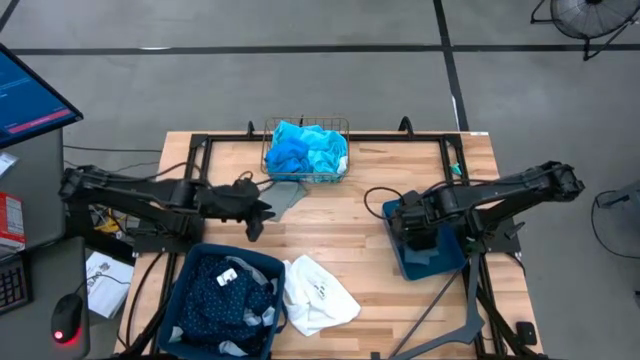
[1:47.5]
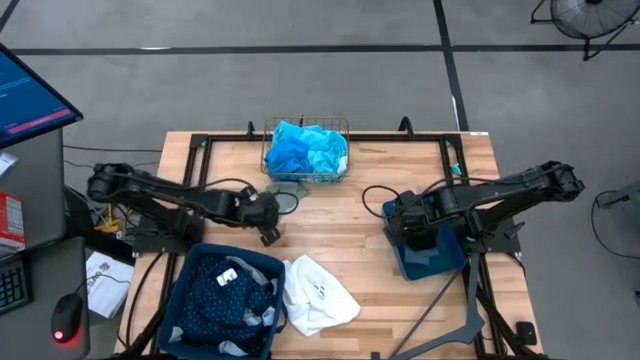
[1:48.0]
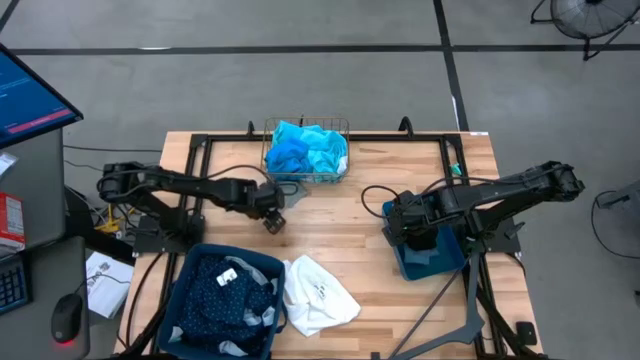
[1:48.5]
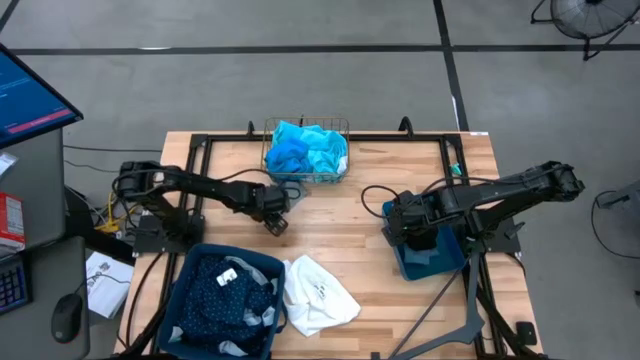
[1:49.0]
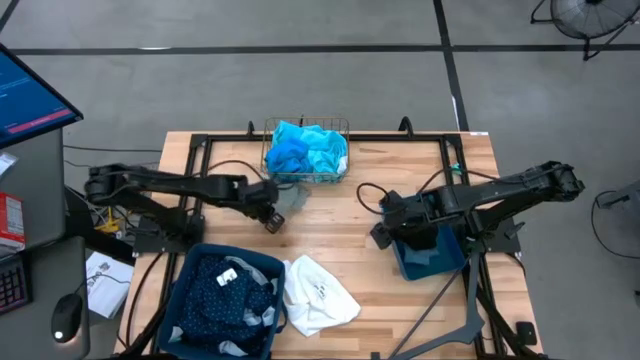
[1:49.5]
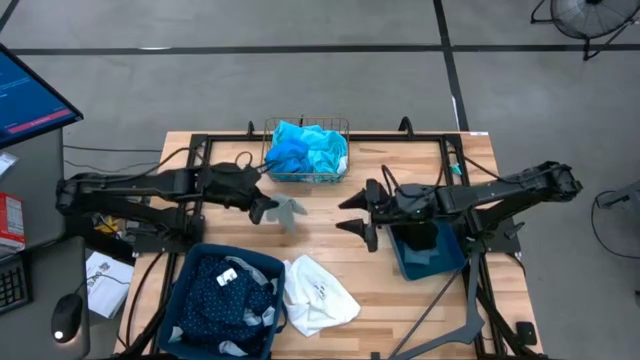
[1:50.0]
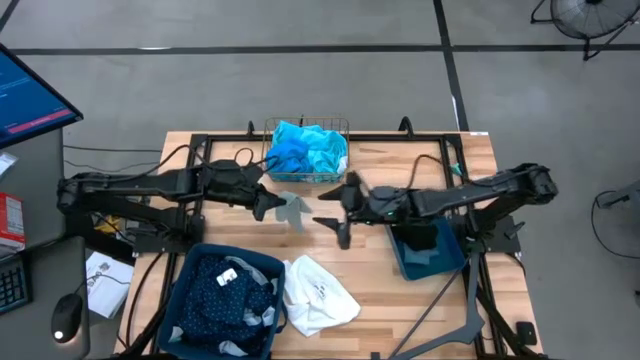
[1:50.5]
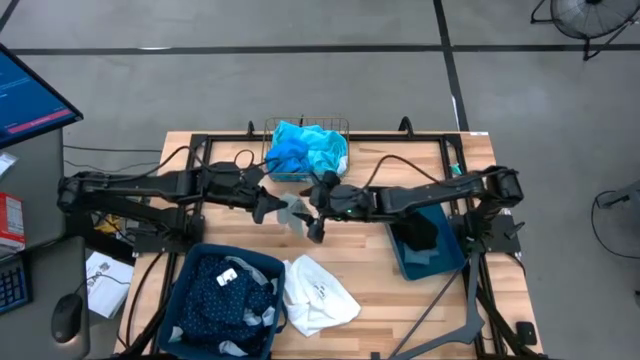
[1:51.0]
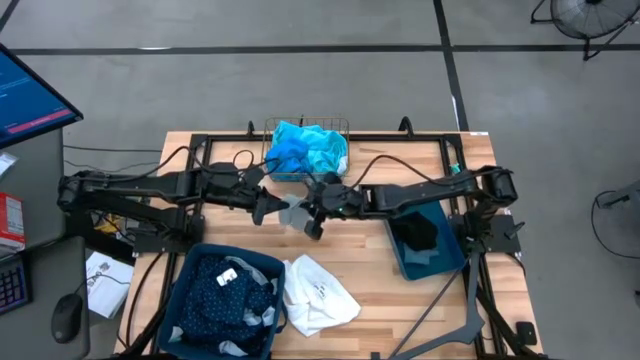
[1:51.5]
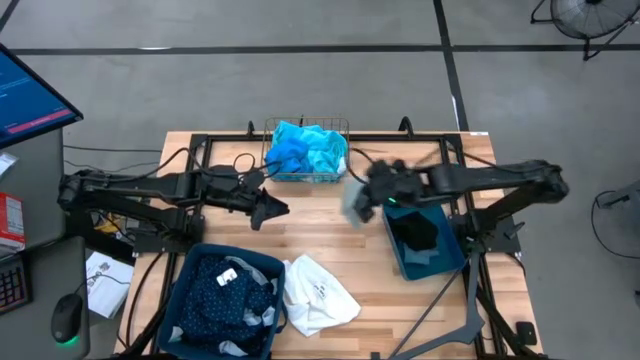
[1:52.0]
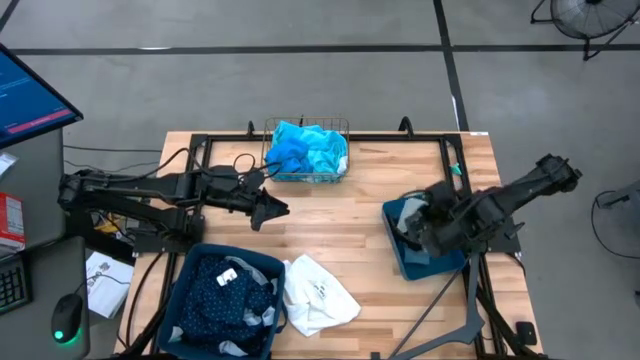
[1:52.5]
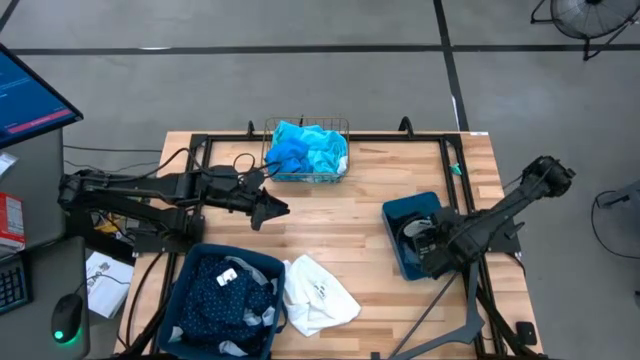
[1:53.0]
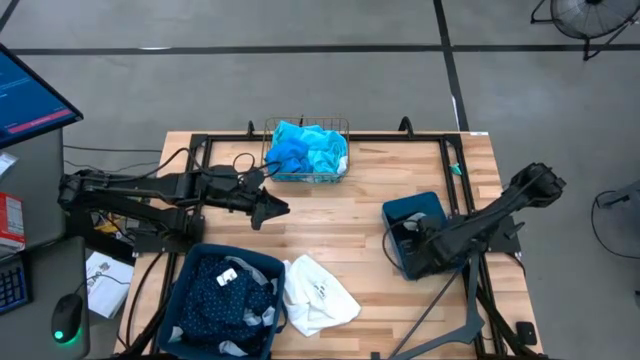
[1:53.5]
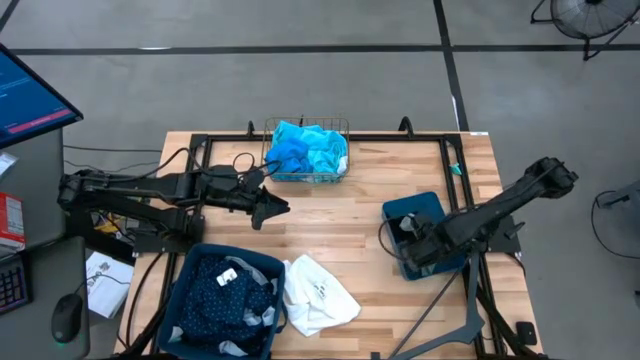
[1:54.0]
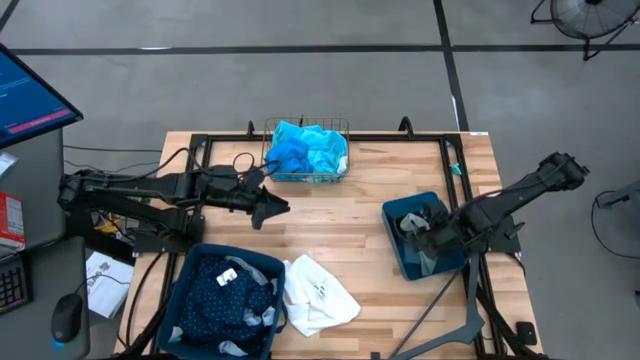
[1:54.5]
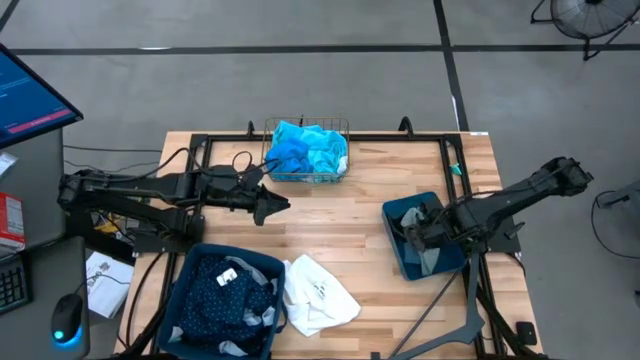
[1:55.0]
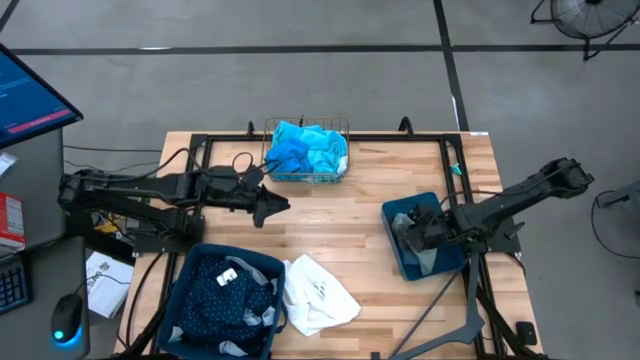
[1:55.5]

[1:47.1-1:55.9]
Task: Pick & Place Cloths
Put the light gray sock into the blue bin

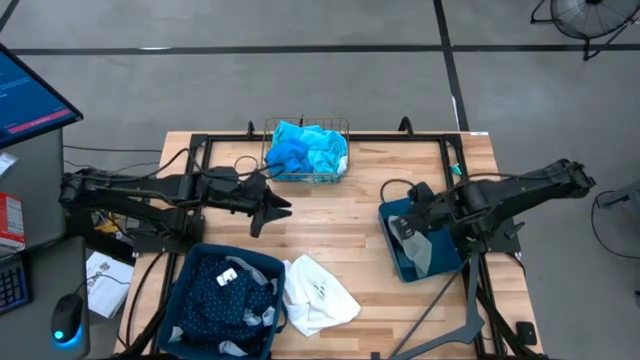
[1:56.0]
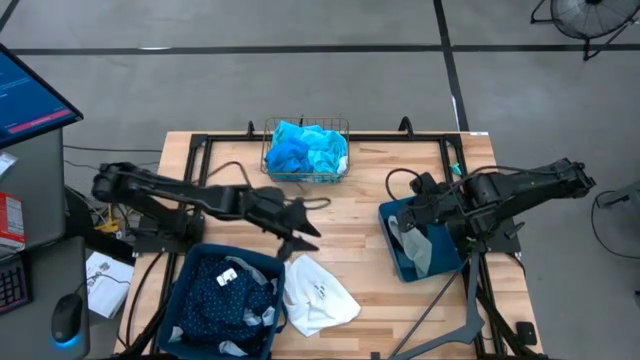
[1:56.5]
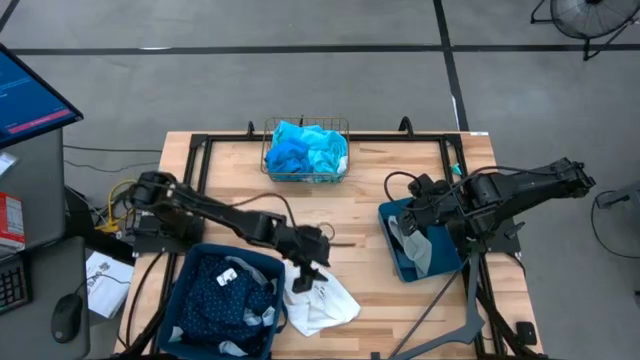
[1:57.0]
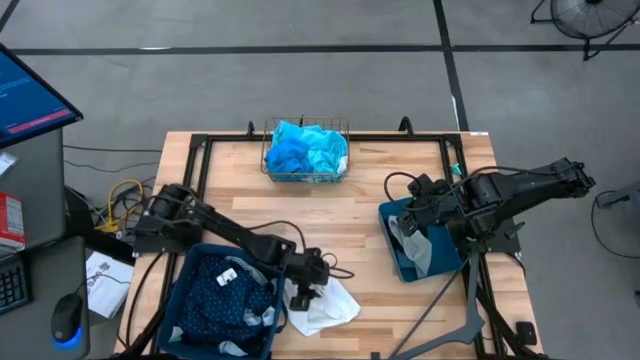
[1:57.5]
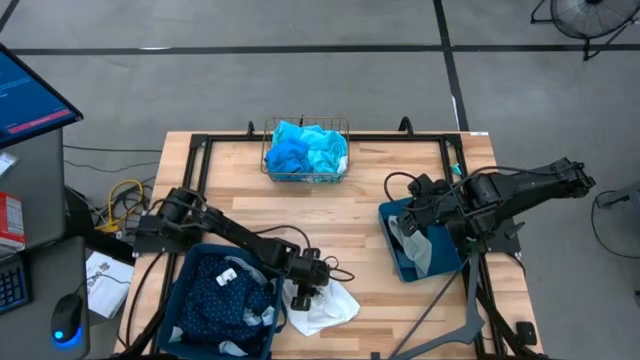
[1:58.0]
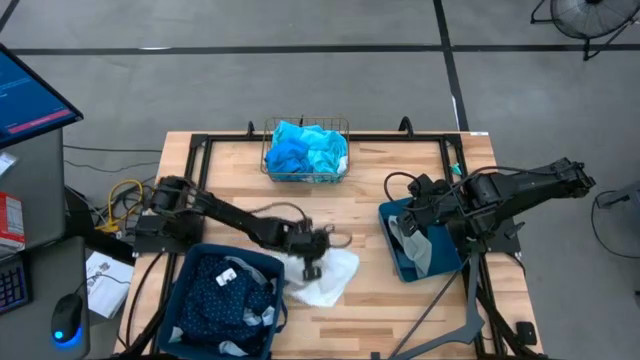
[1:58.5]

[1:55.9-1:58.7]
Put the white shorts into the gold wire basket

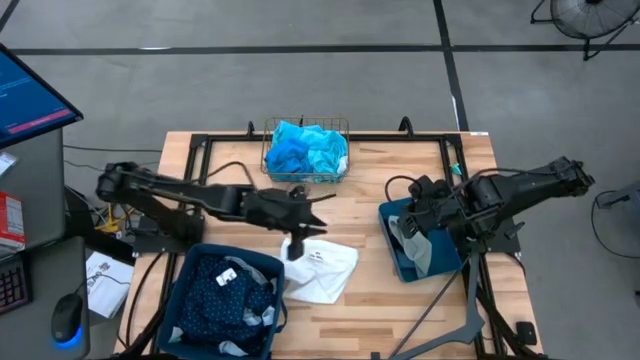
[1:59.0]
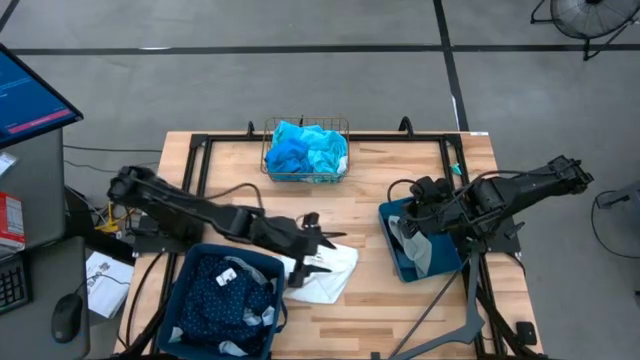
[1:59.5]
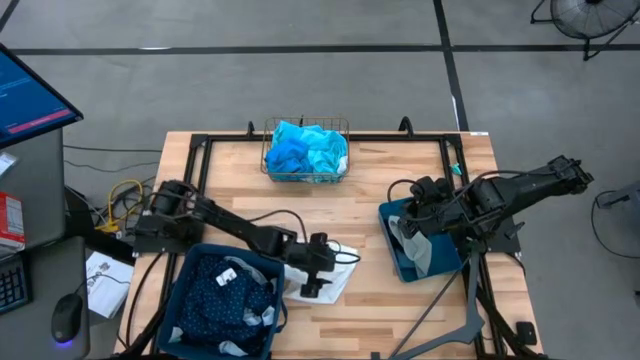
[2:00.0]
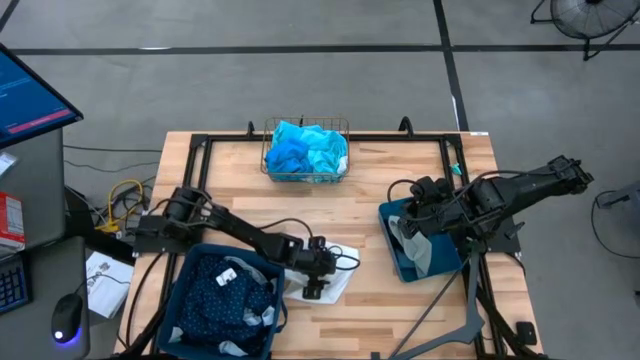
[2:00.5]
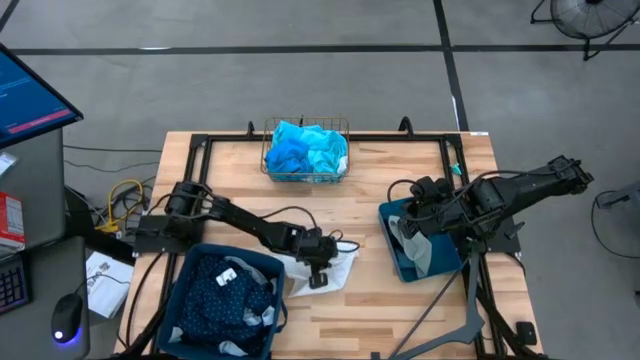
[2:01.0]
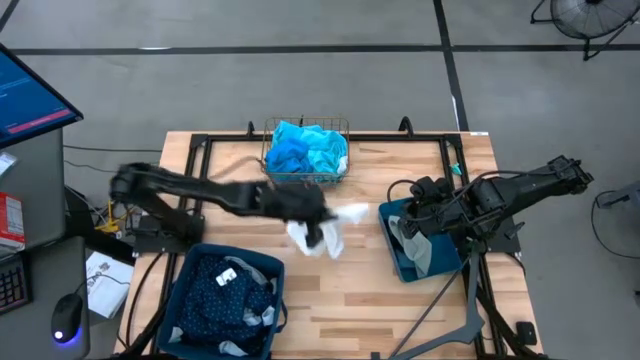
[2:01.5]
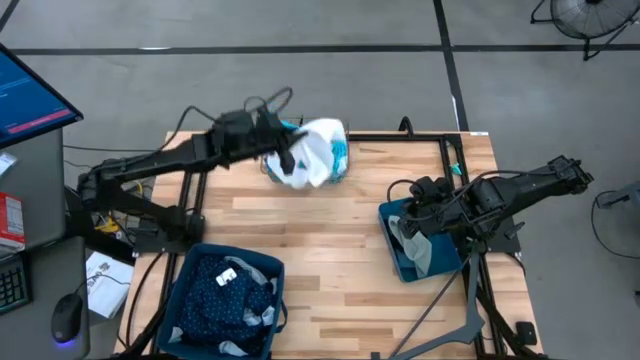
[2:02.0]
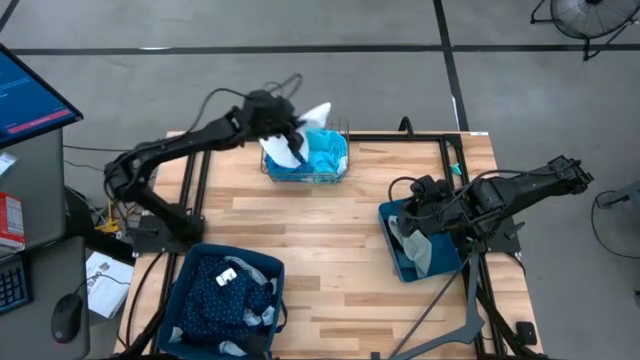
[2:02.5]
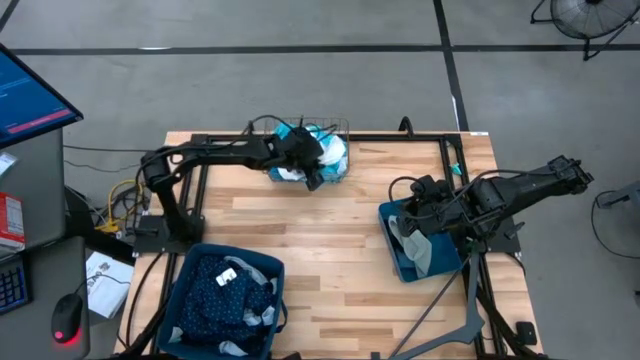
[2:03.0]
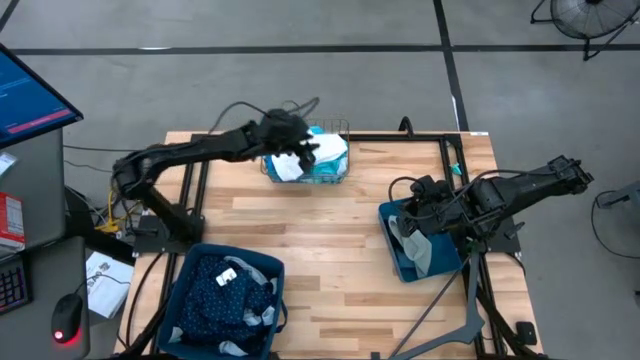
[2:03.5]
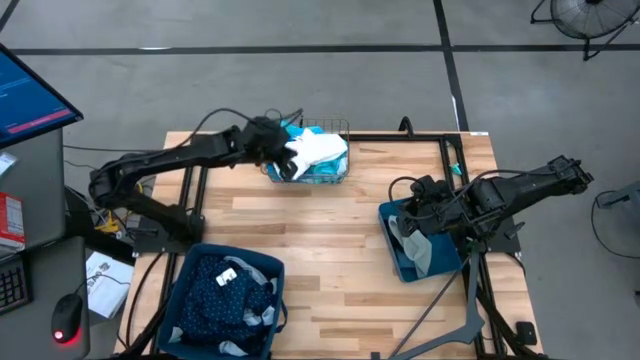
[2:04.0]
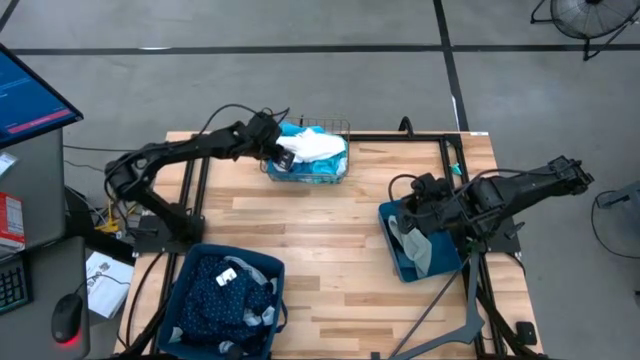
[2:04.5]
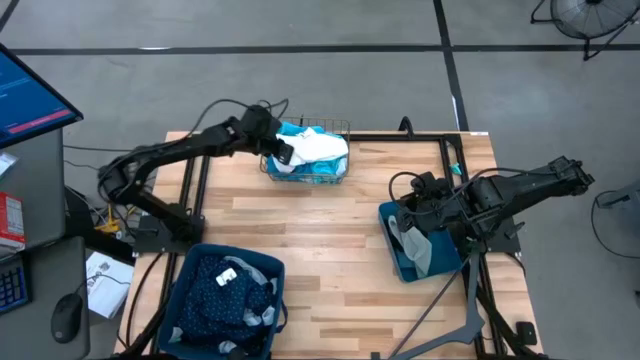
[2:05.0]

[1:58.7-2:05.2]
Put the white shorts into the gold wire basket

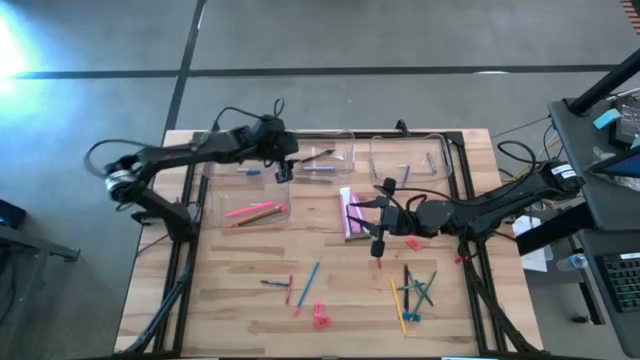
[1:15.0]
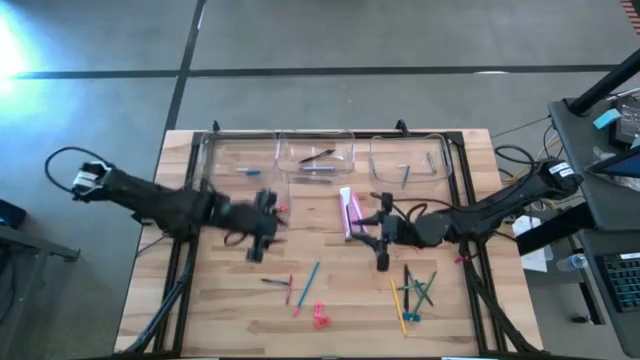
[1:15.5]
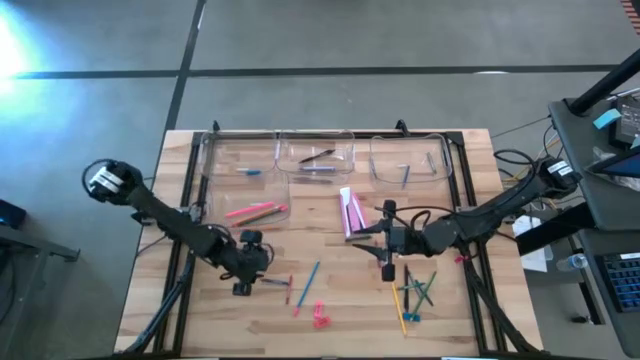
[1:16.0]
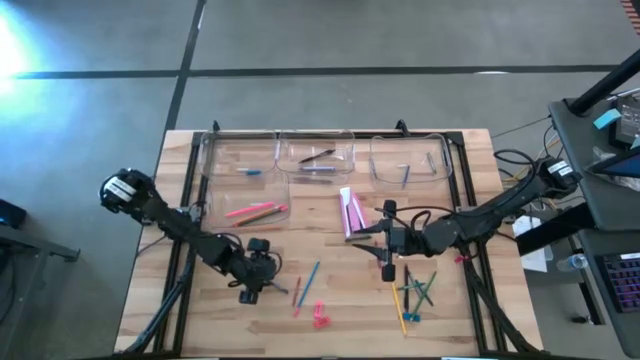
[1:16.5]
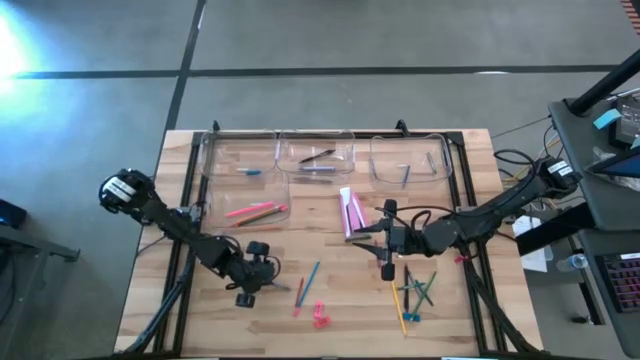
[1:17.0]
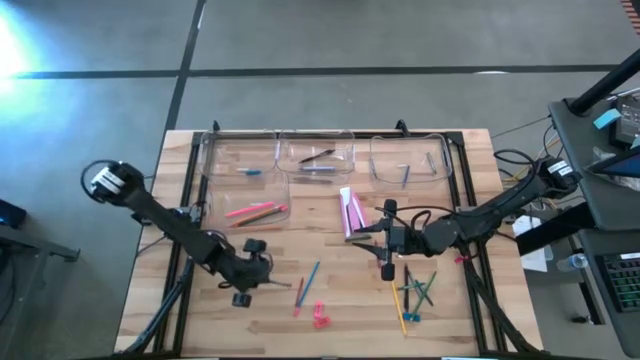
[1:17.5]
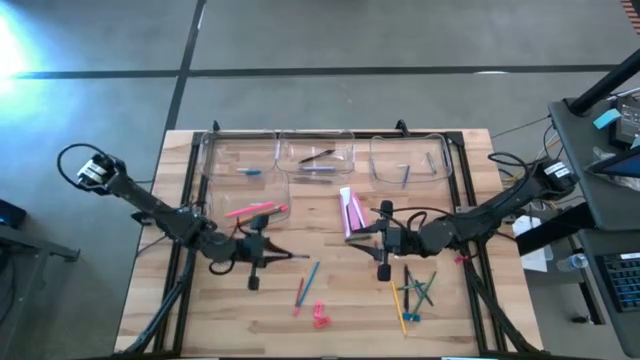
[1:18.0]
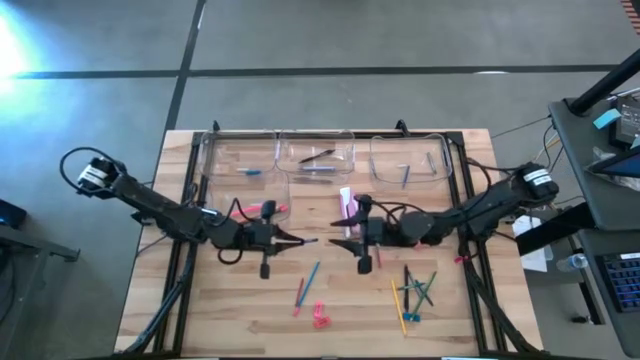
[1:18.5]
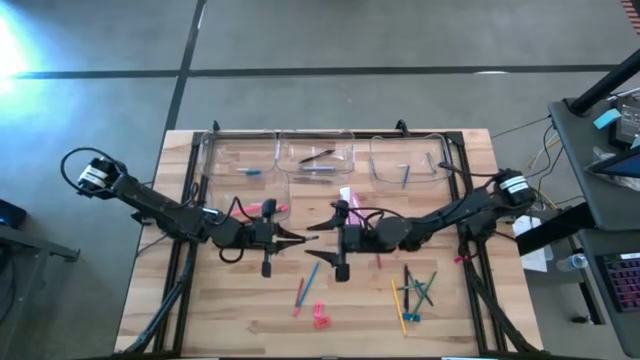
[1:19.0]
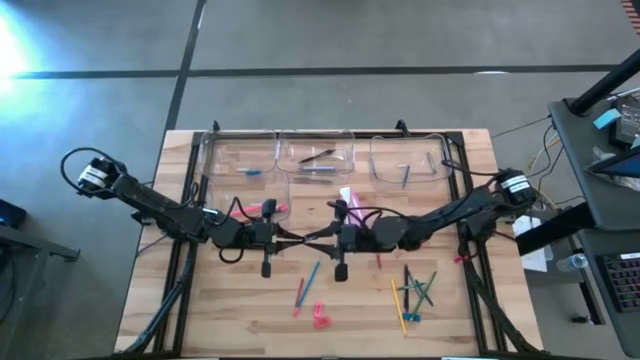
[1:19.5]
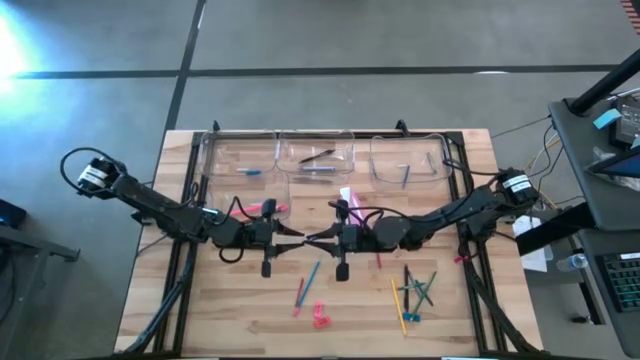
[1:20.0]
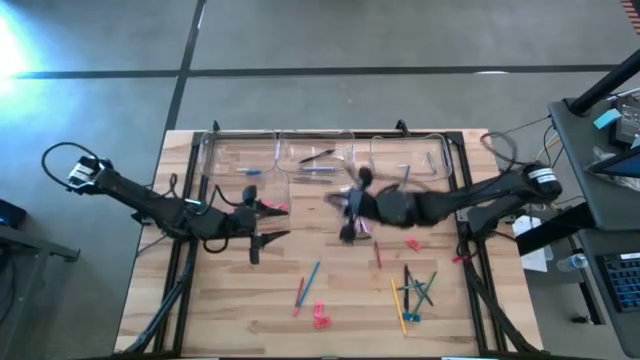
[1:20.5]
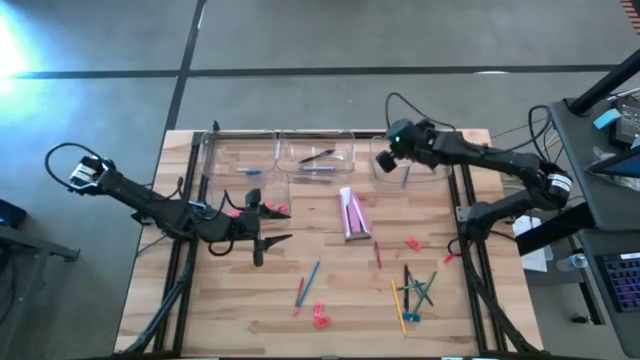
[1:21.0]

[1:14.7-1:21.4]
Task: Sort crayons/erasers/pens/pencils in bins
Put the blue crayon into the top right transparent bin
